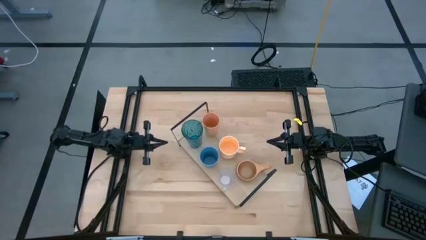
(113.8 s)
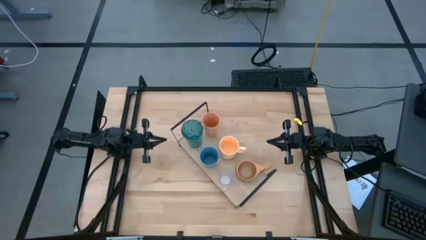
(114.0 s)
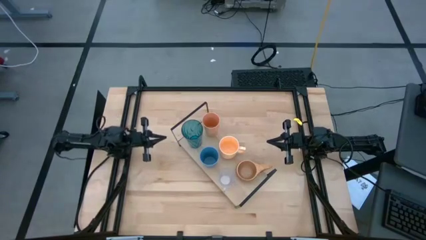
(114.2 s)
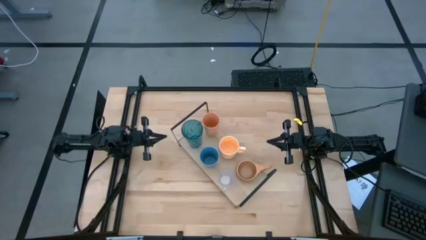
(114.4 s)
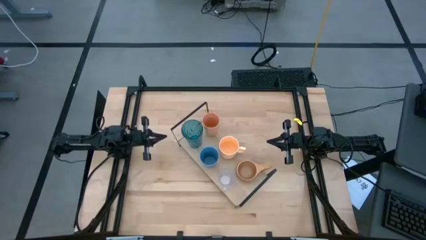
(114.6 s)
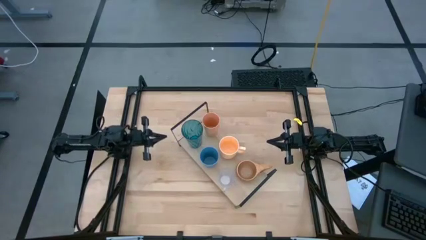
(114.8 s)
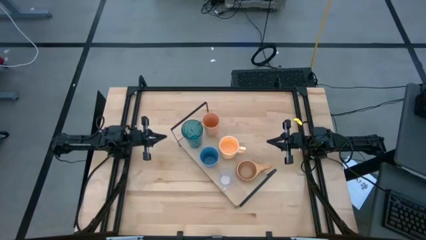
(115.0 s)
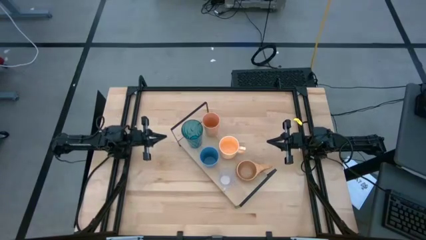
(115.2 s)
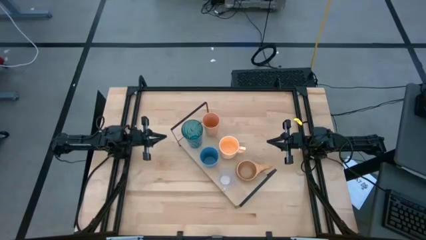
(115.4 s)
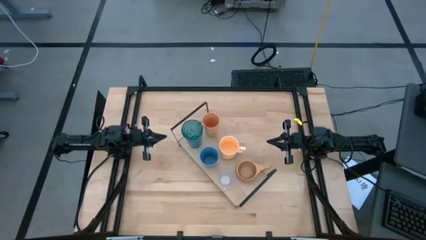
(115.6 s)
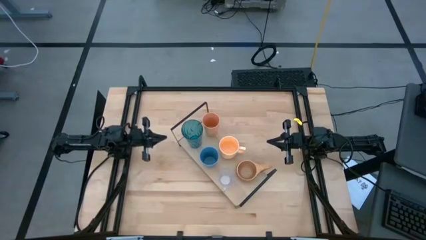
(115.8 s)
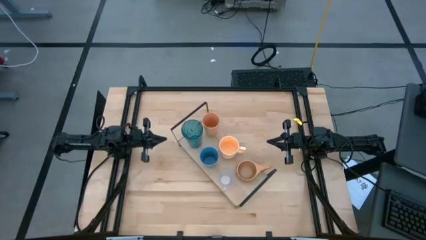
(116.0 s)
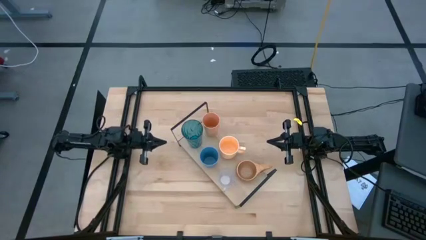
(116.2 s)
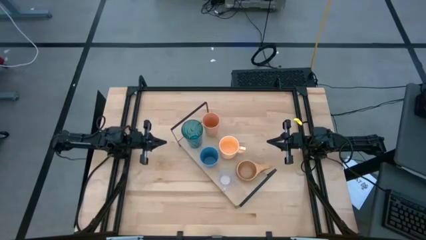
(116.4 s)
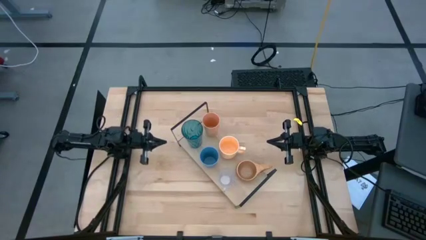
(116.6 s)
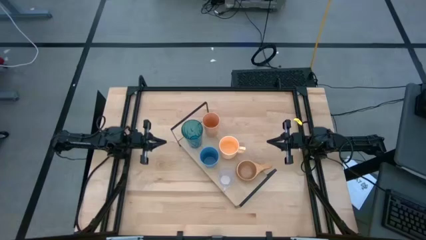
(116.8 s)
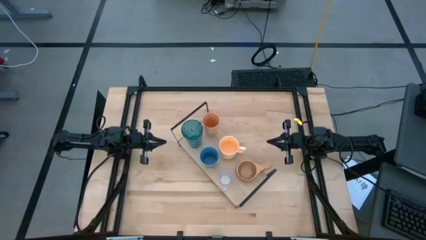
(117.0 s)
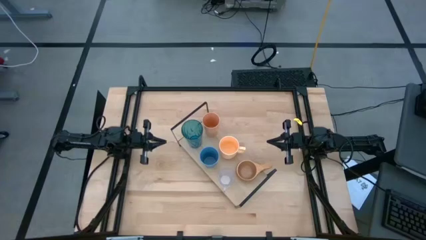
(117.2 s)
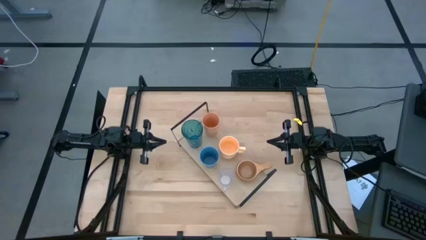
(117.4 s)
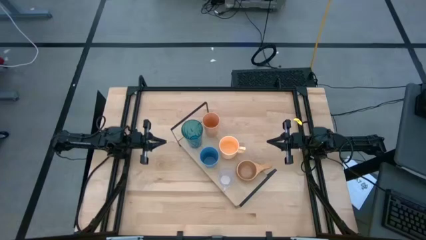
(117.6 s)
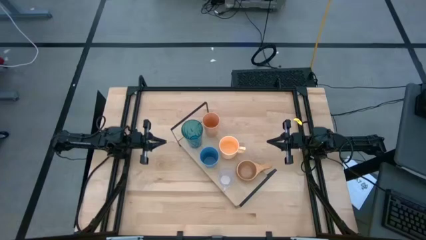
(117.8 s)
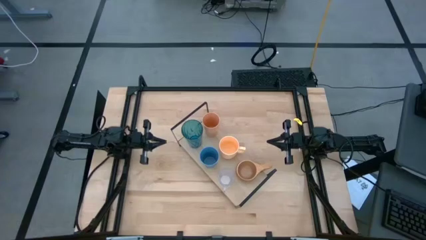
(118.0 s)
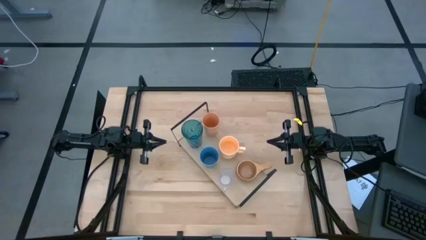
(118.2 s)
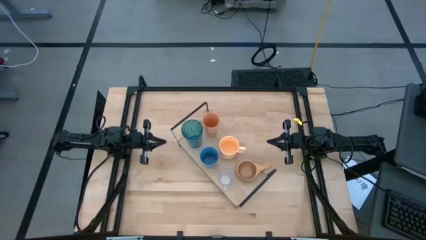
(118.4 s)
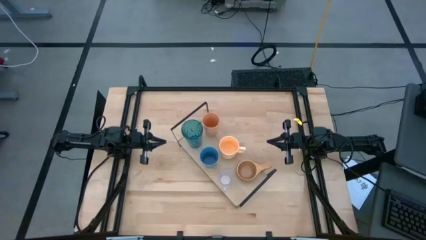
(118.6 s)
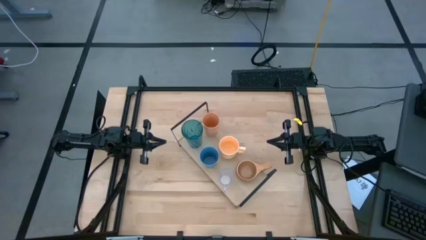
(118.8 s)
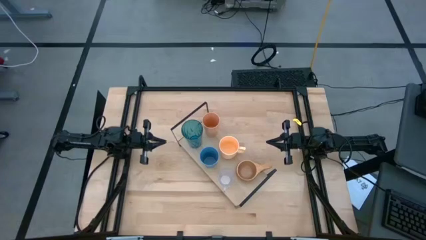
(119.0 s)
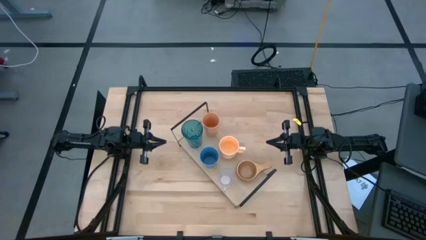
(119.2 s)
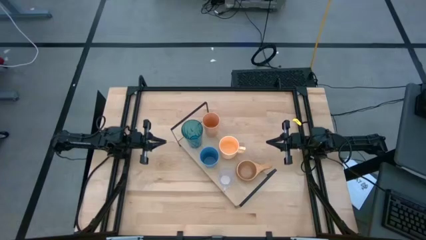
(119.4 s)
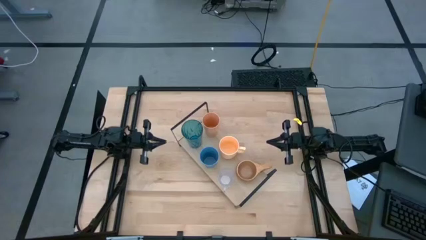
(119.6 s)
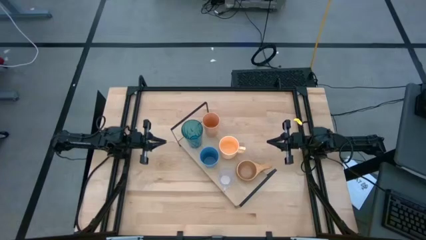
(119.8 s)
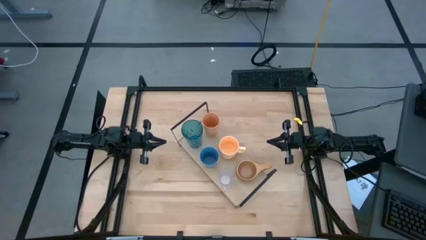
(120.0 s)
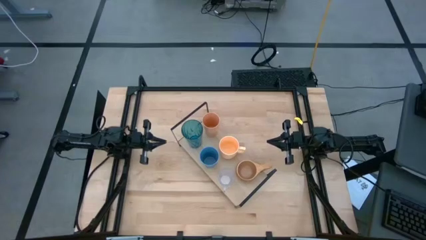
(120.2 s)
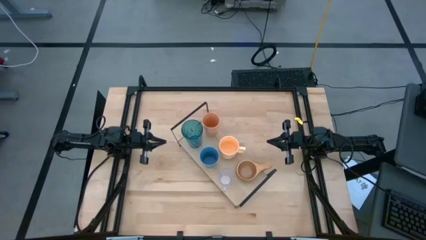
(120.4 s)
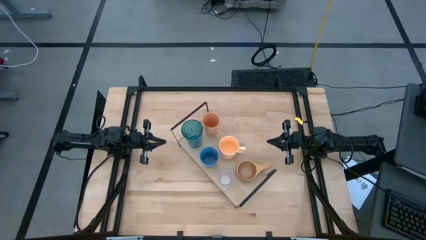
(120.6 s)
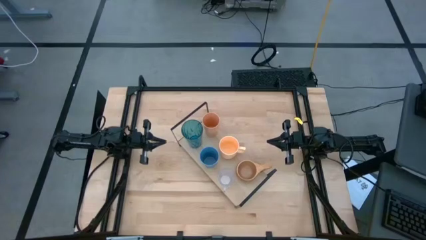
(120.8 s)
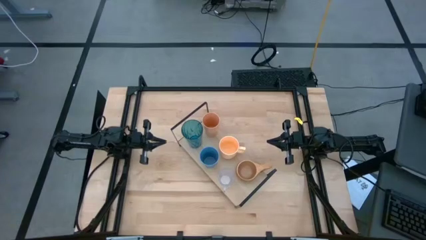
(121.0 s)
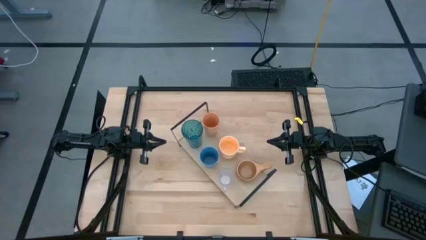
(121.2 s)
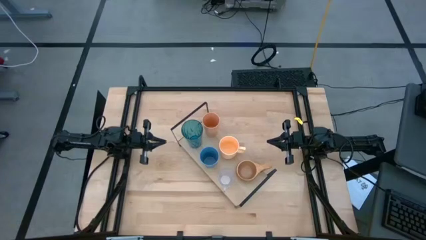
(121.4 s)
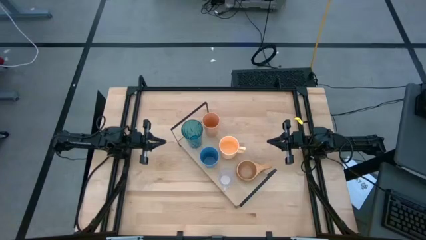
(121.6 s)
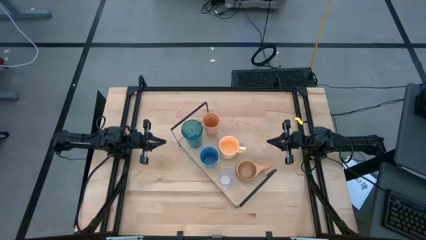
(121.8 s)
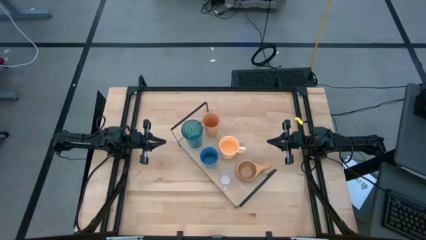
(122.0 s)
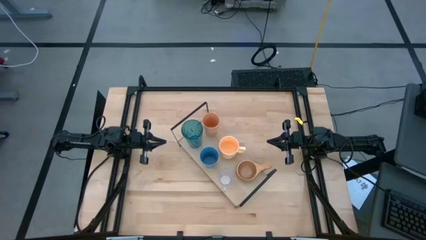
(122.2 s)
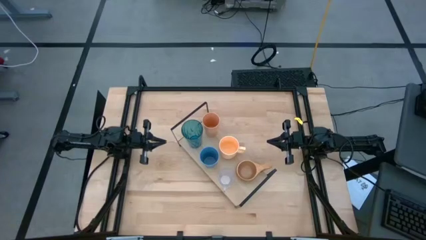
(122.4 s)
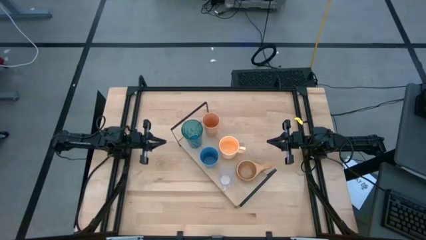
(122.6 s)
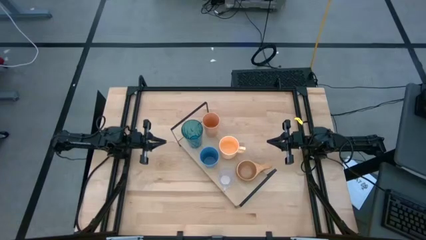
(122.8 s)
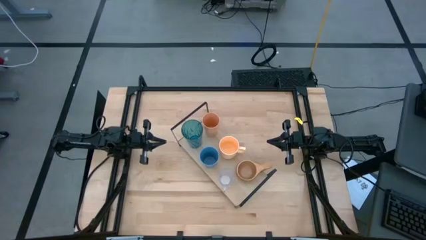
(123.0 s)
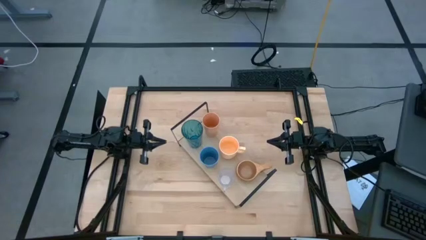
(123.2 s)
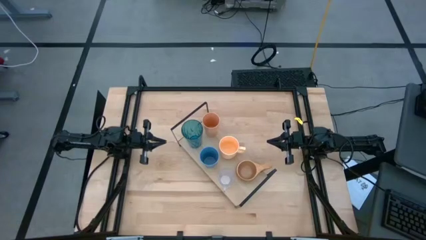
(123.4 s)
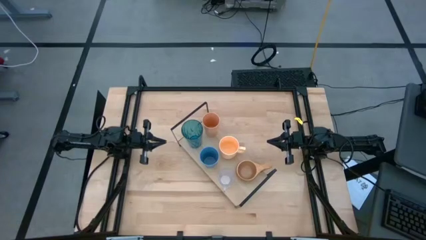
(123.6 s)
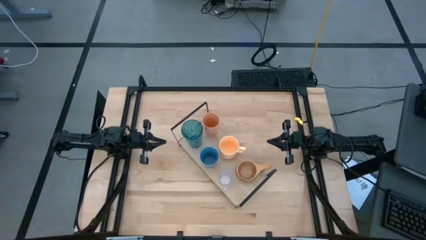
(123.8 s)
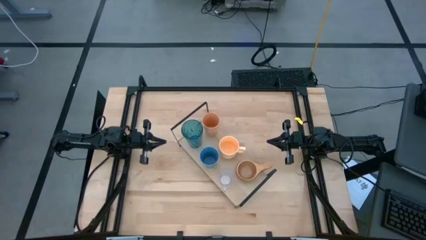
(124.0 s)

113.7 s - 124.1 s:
Task: Stack small to large cups/mugs on shelf
Return to Home Position

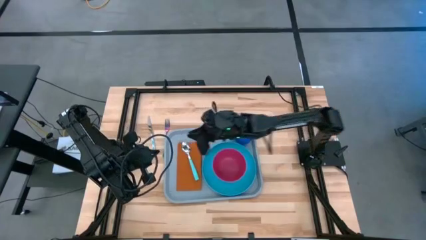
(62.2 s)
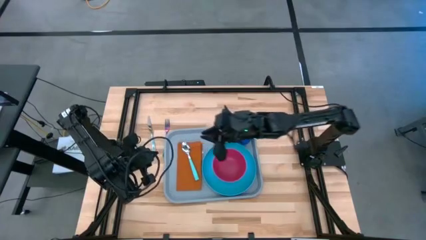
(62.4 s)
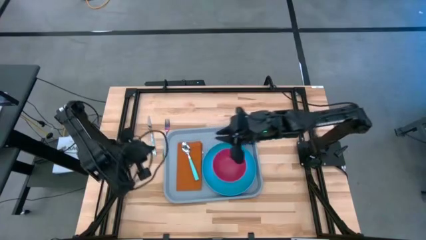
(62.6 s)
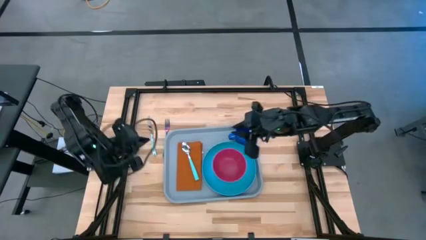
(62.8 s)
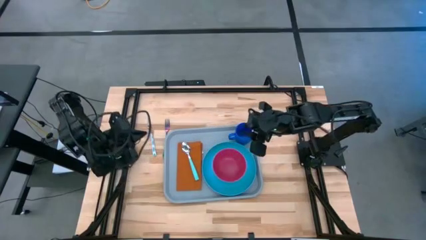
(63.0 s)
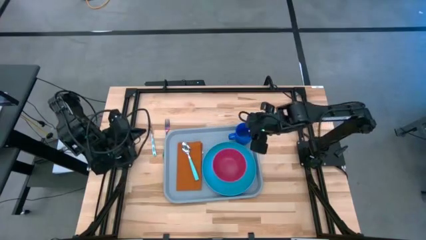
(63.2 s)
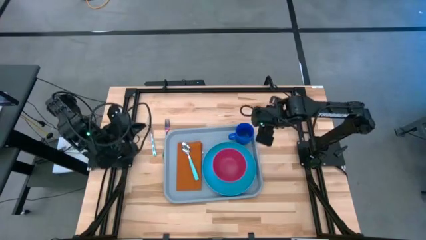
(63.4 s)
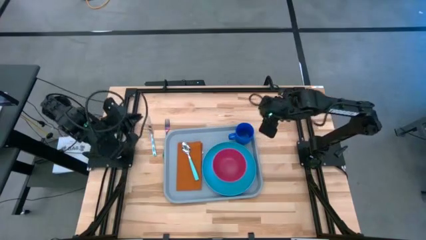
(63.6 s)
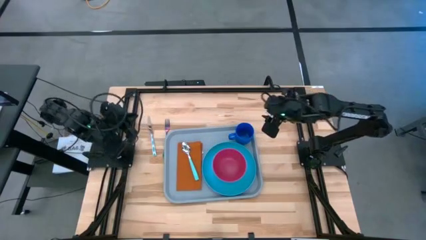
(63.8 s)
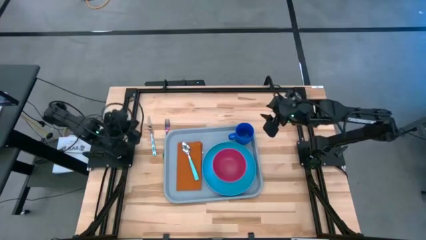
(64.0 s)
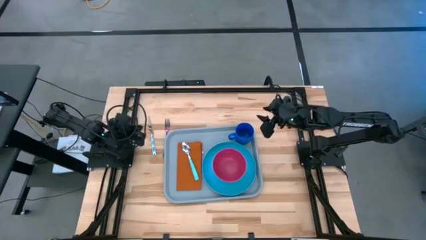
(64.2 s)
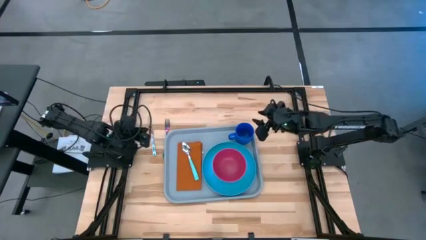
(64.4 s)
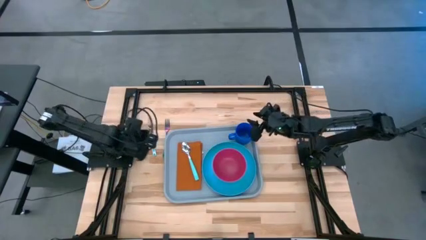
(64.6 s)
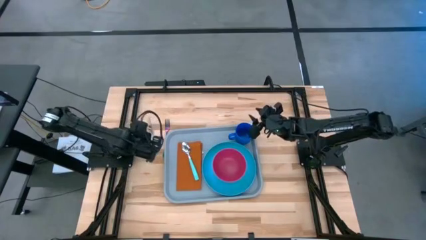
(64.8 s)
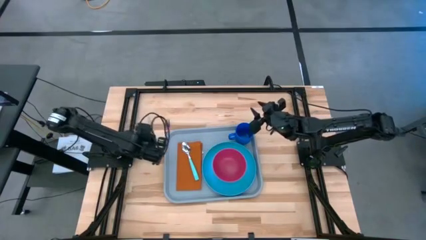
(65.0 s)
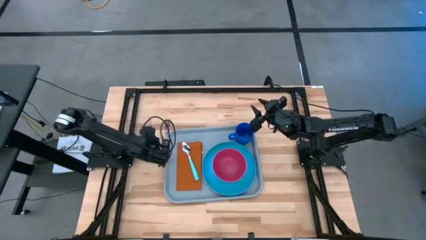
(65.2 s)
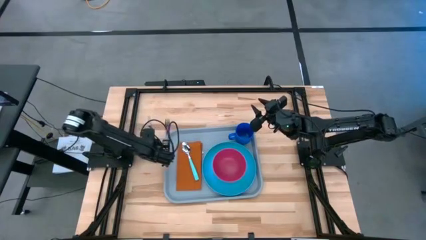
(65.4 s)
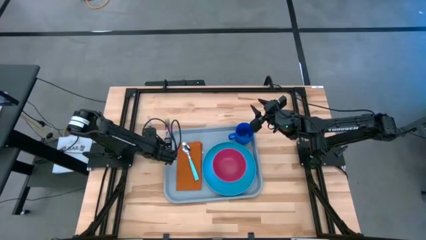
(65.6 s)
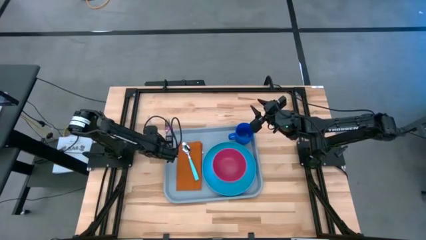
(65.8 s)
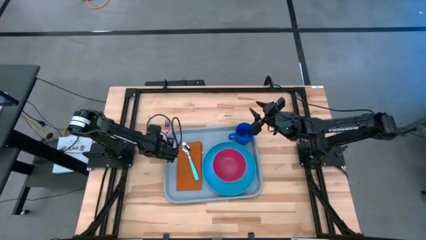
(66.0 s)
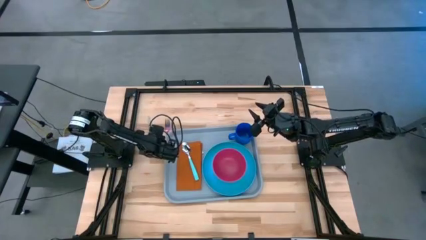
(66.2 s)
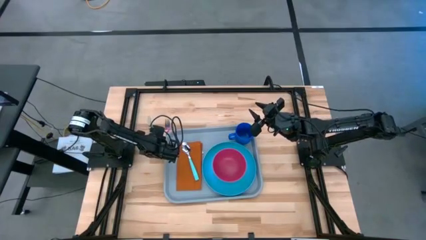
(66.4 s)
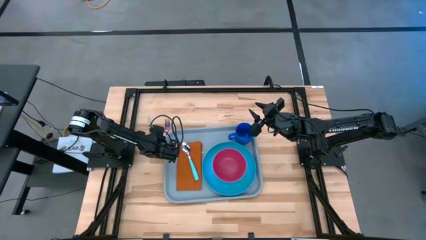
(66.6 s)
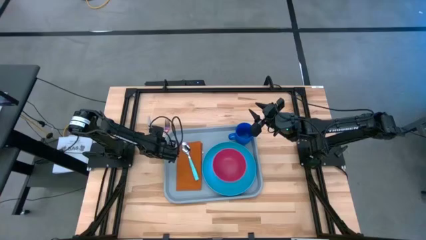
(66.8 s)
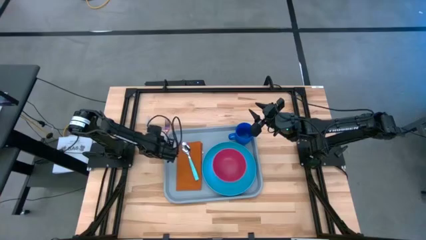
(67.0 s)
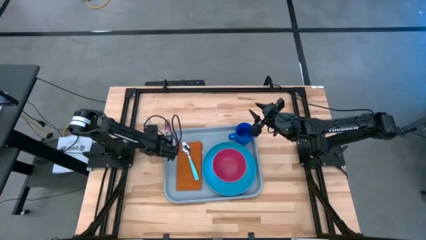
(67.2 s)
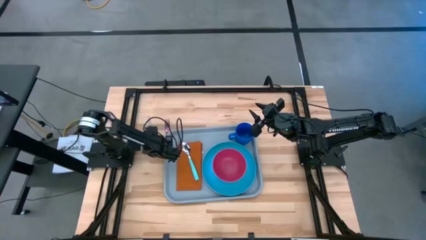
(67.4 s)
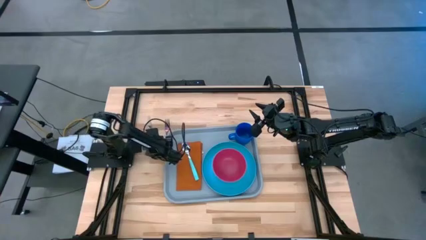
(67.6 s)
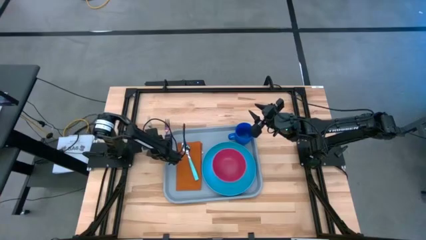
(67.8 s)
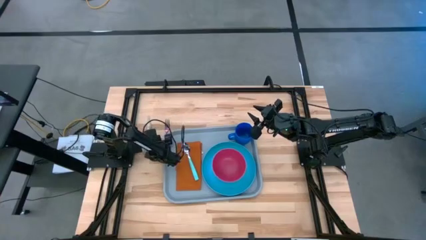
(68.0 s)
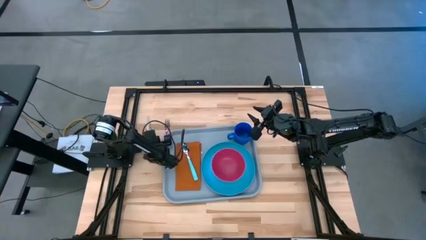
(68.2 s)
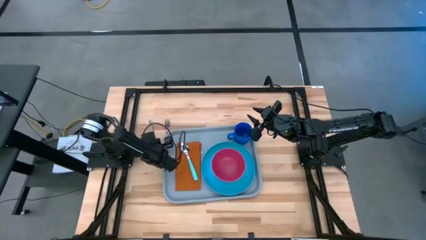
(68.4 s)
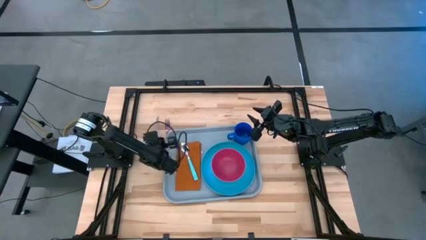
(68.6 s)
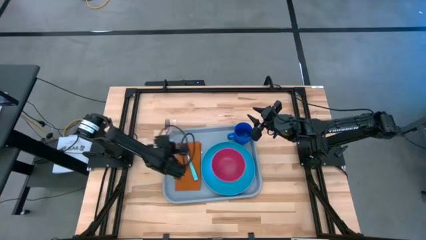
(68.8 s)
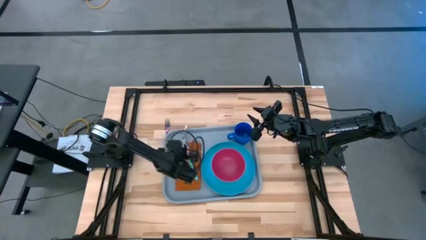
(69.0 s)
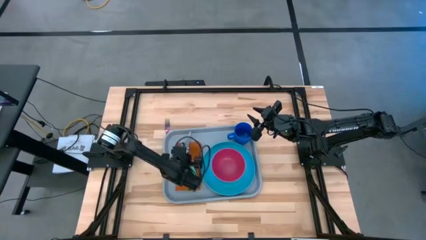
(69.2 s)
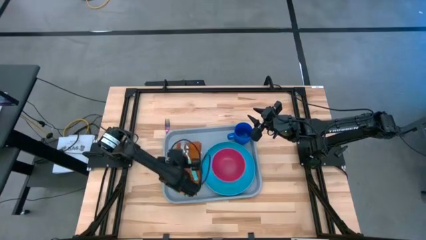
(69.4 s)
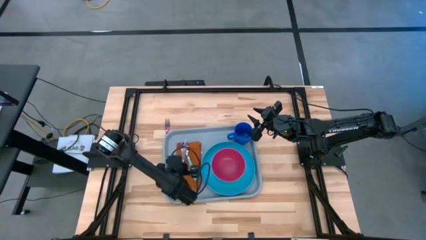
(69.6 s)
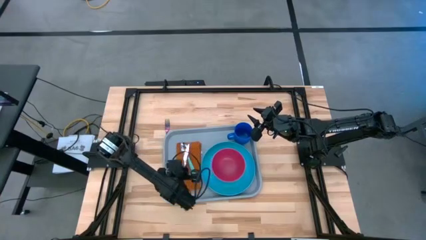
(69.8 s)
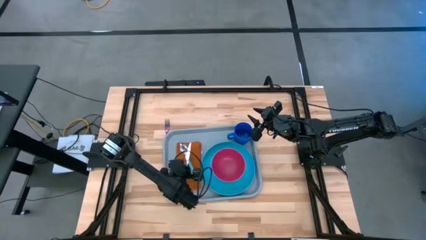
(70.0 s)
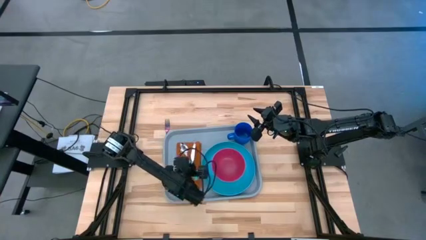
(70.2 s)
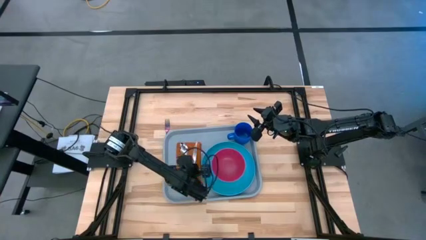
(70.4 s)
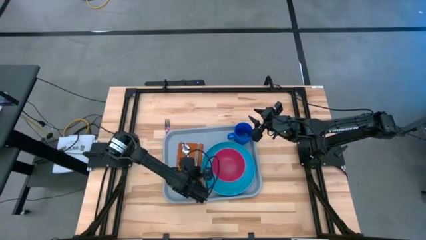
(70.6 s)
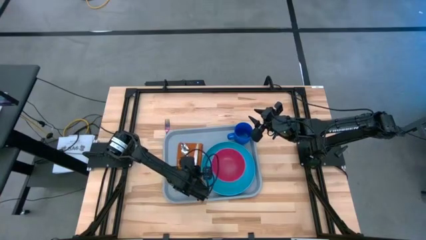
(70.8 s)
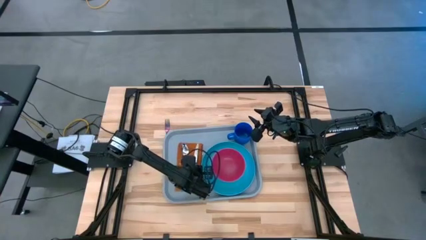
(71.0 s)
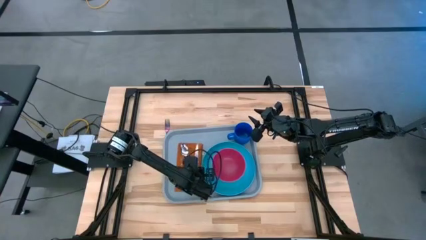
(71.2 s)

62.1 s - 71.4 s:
Task: Set up tray
Put the green table knife to the left of the spoon on top of the orange table napkin
